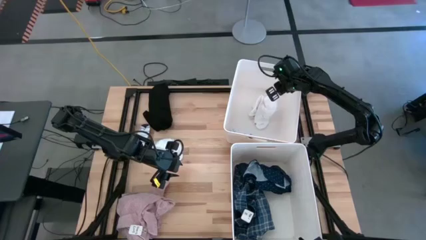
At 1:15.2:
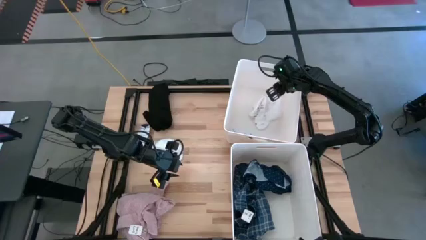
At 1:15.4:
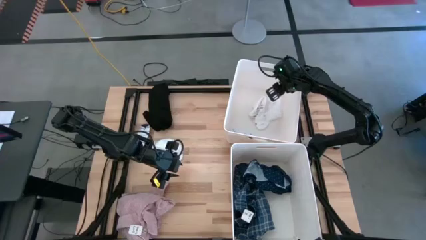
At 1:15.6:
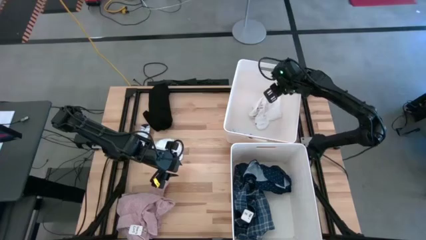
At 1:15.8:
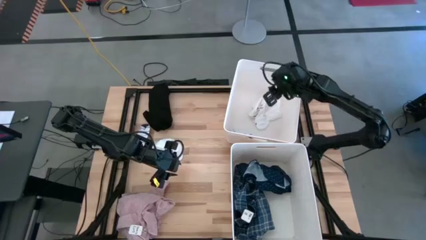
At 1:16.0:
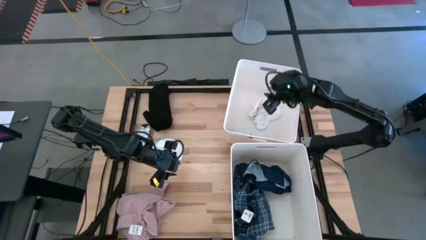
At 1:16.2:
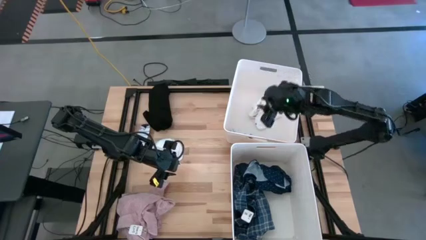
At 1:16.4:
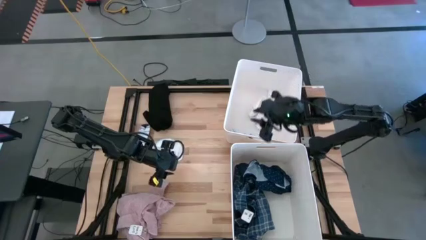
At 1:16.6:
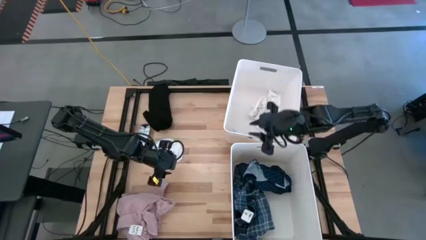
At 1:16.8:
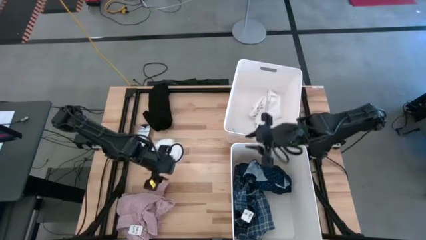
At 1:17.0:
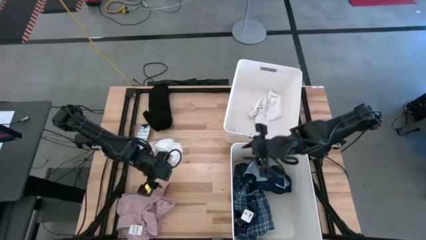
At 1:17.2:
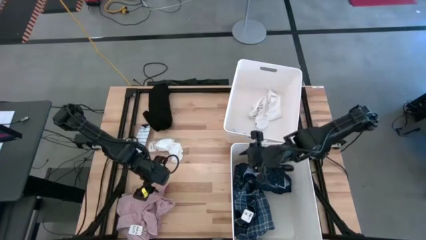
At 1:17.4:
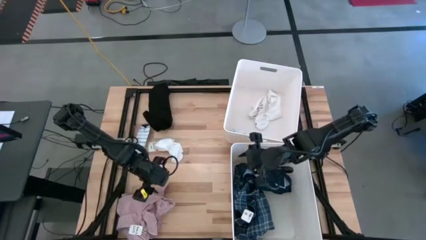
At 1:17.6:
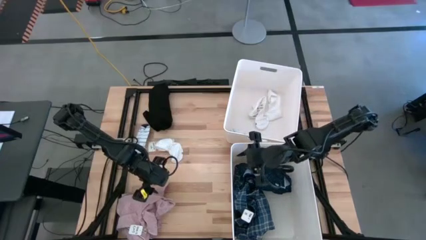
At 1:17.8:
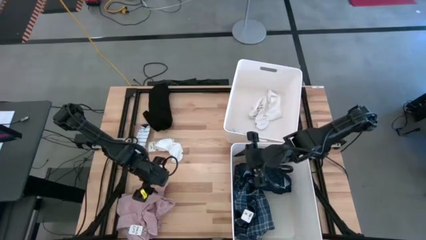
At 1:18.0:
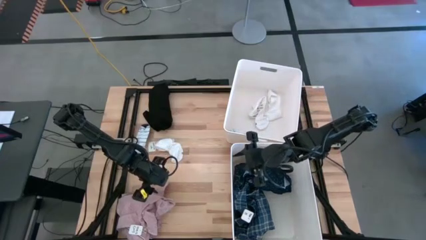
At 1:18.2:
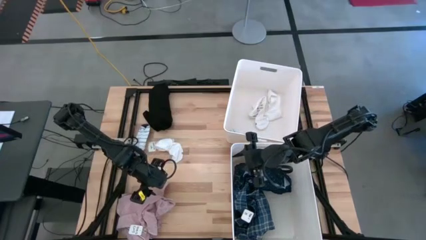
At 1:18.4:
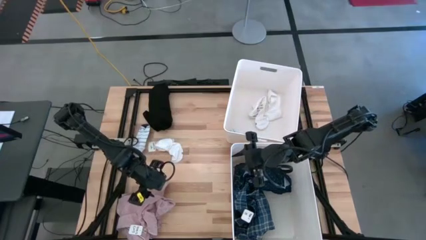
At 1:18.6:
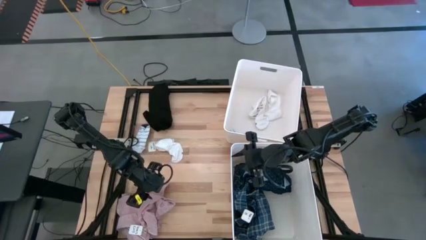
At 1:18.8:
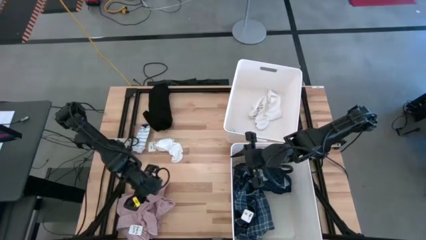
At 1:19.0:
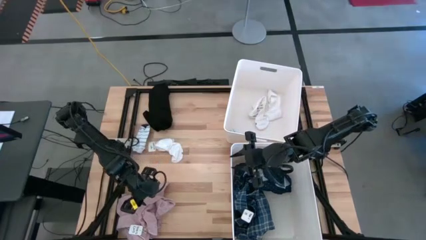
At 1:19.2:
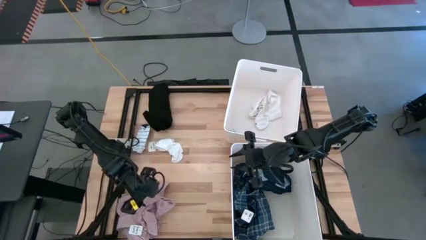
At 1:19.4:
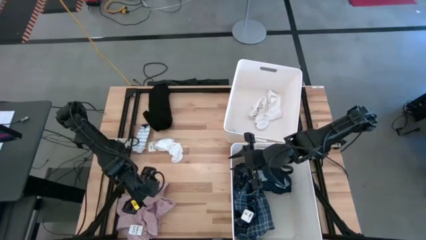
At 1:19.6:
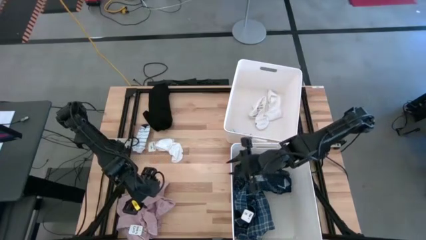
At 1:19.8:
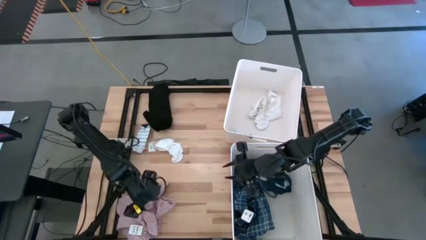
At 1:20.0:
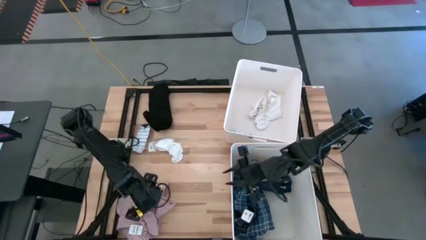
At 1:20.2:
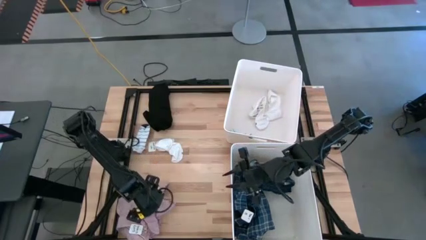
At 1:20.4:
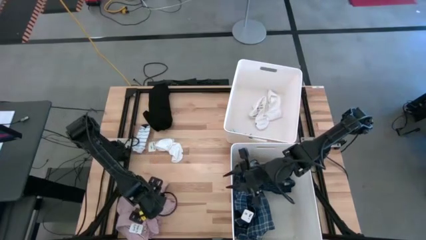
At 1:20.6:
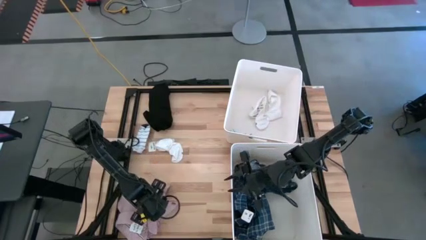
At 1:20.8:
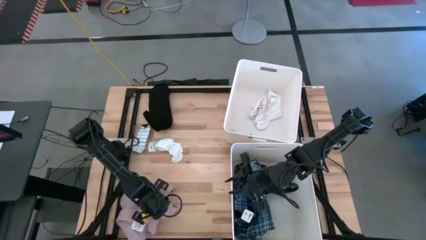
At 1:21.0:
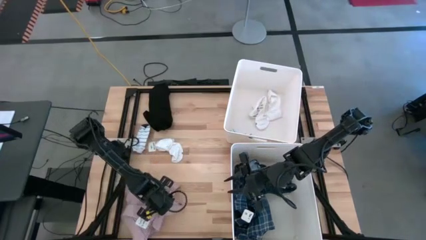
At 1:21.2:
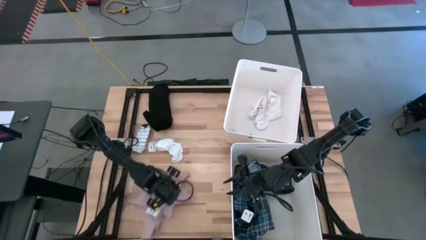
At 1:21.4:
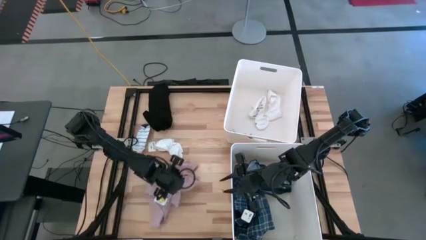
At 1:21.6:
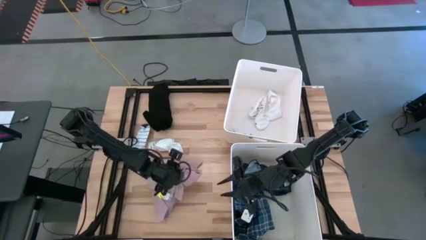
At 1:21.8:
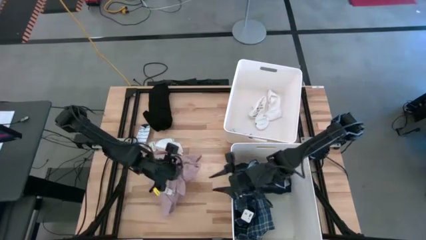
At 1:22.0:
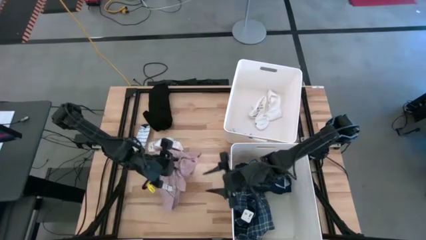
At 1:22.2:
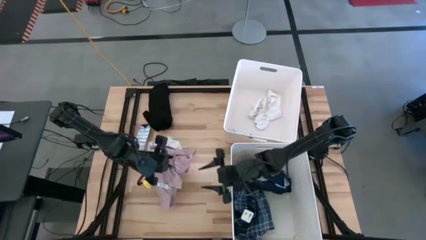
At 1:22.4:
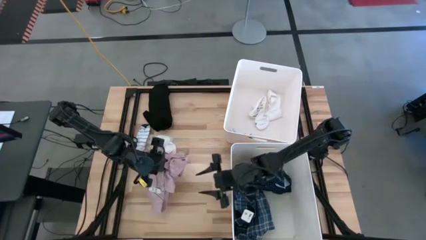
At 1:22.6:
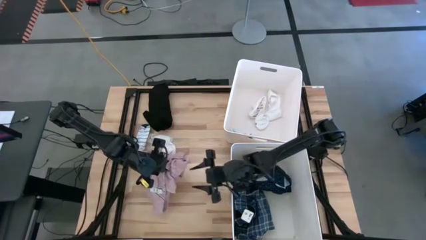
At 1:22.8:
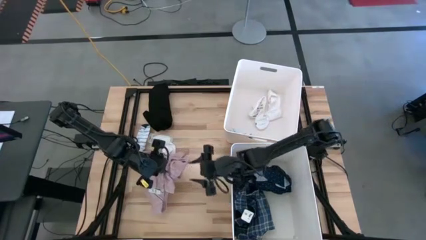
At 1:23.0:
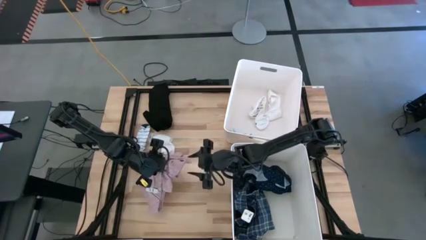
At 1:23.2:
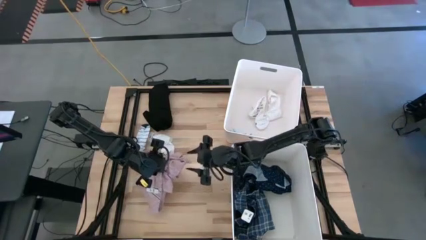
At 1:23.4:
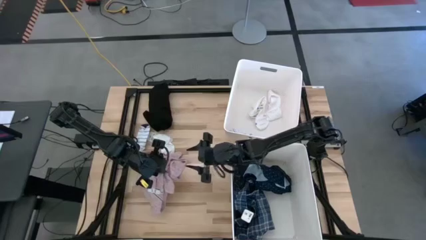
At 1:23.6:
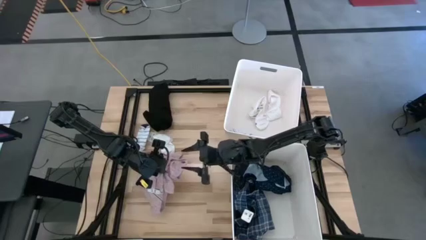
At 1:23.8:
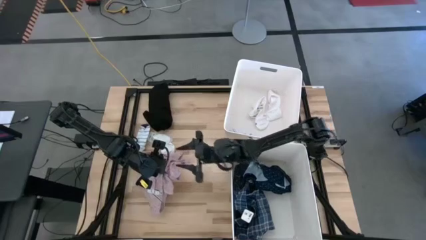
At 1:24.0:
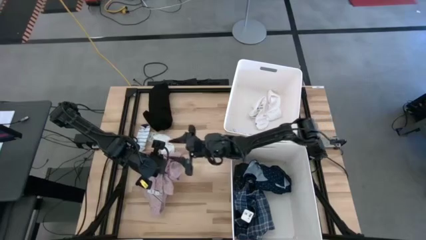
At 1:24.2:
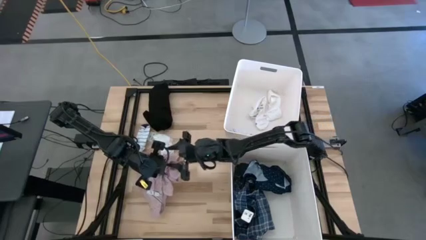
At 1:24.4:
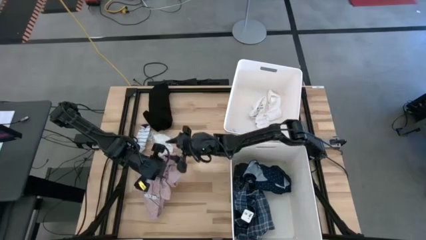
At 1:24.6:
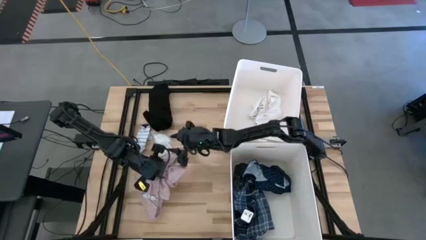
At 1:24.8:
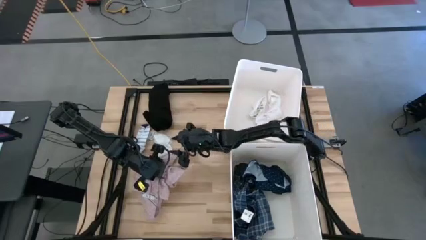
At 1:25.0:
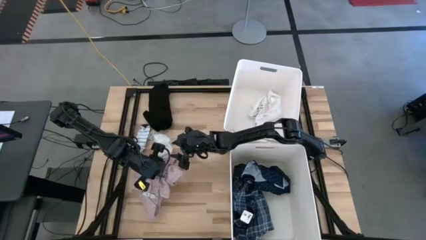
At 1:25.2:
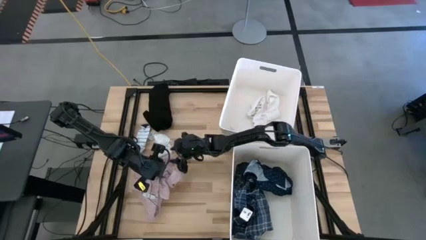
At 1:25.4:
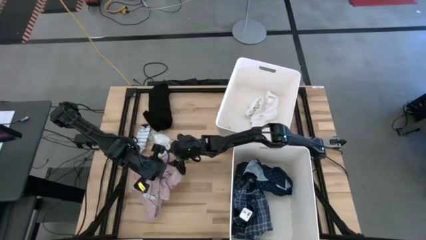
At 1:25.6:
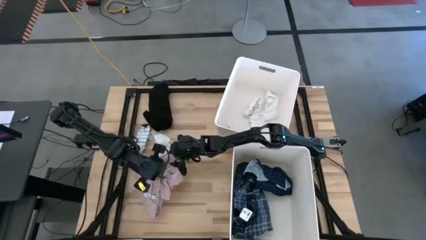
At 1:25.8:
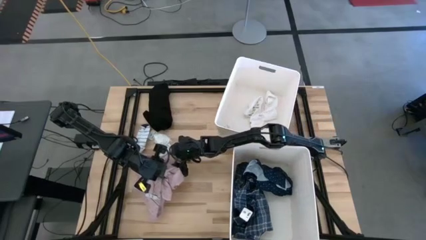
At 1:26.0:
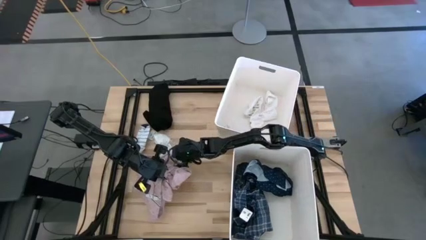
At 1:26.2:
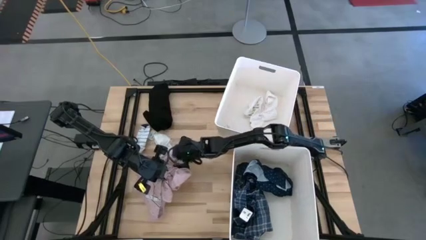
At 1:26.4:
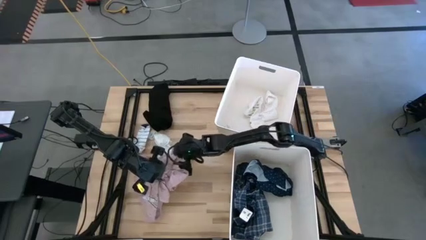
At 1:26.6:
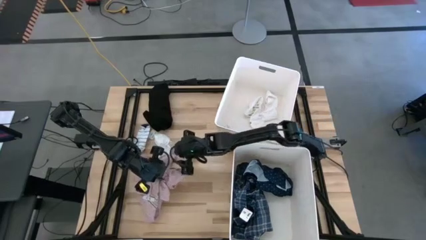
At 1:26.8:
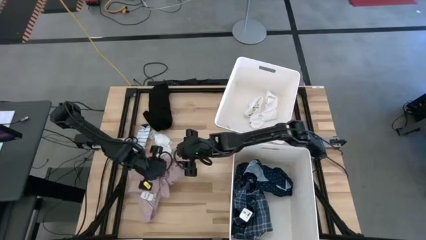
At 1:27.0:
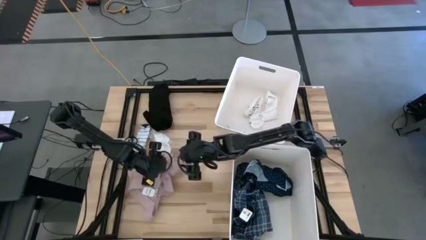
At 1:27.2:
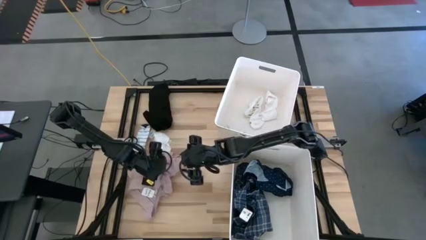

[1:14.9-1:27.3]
Task: Sort clothes
Put the light red polo shirt into the bottom white laundry bin

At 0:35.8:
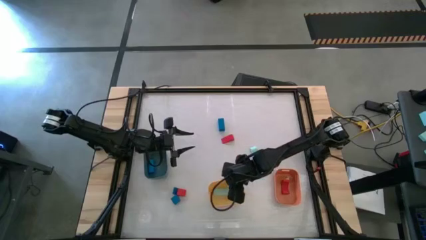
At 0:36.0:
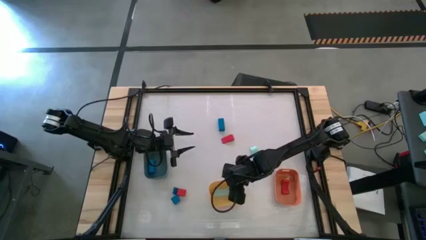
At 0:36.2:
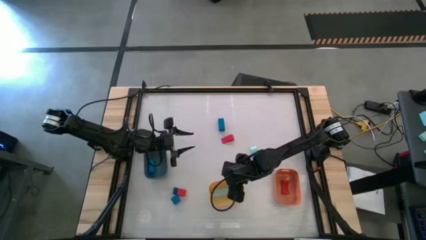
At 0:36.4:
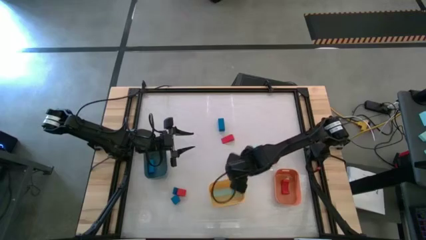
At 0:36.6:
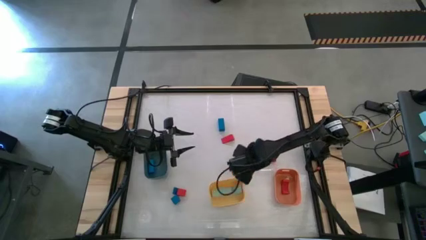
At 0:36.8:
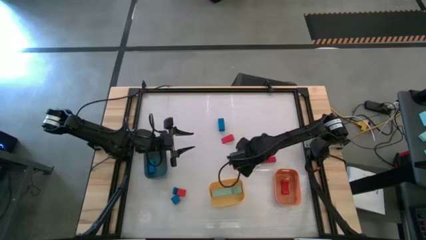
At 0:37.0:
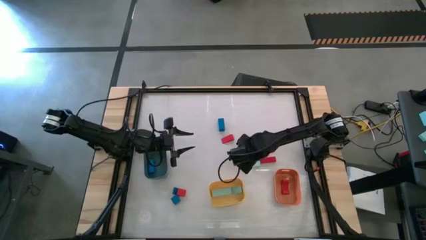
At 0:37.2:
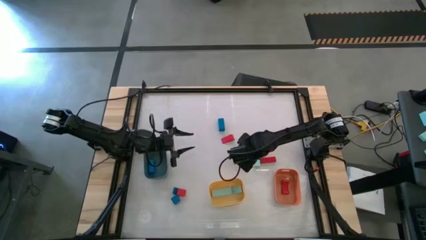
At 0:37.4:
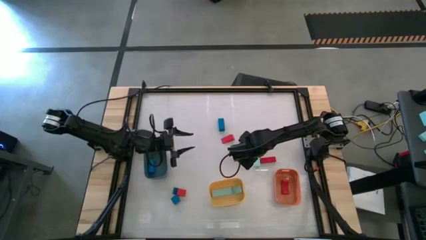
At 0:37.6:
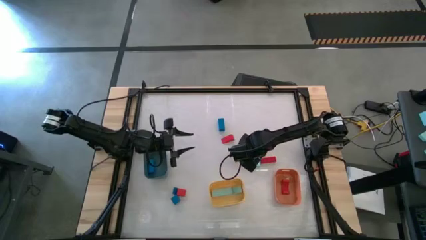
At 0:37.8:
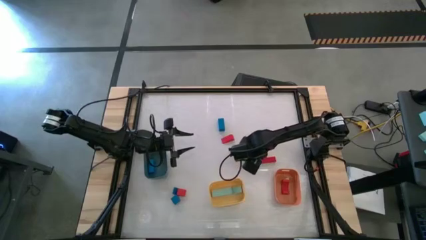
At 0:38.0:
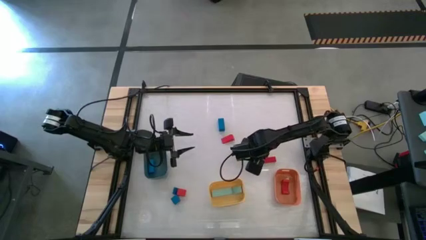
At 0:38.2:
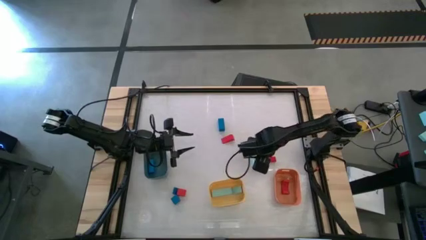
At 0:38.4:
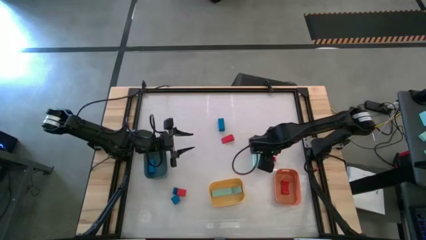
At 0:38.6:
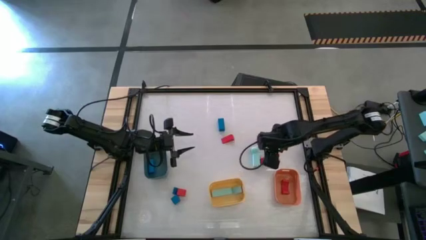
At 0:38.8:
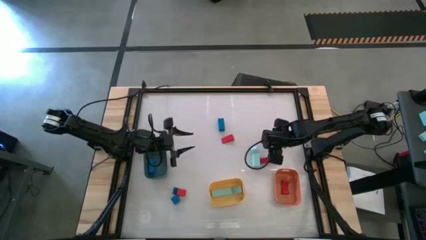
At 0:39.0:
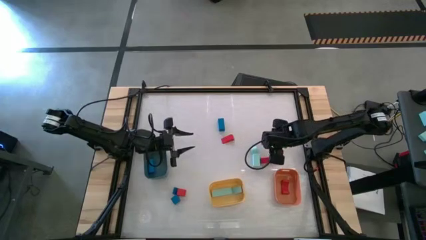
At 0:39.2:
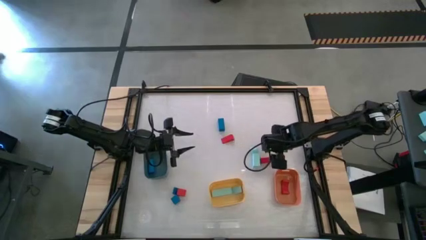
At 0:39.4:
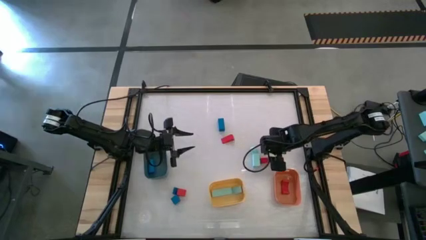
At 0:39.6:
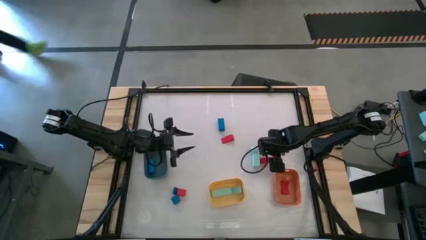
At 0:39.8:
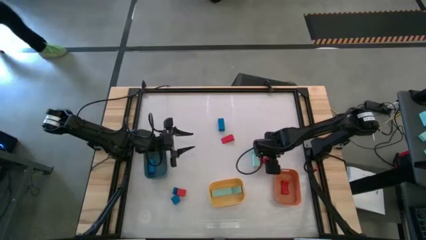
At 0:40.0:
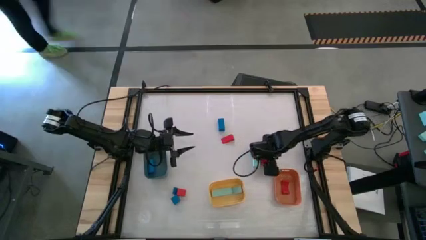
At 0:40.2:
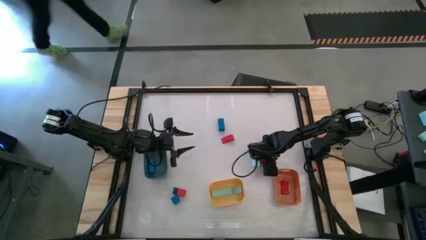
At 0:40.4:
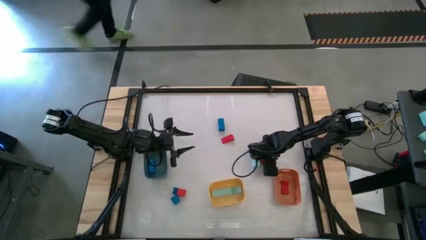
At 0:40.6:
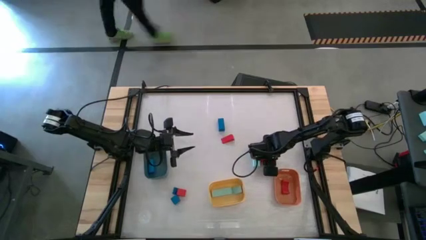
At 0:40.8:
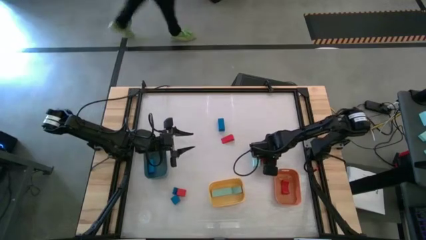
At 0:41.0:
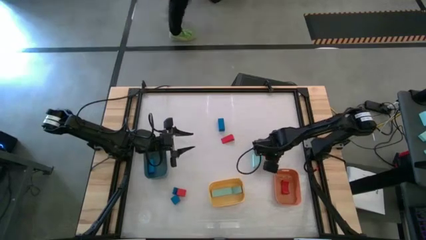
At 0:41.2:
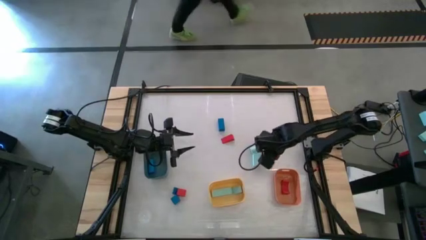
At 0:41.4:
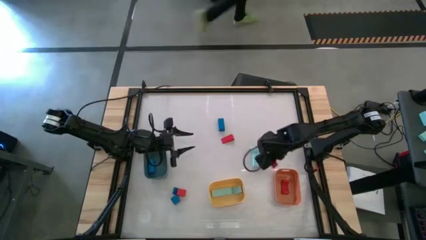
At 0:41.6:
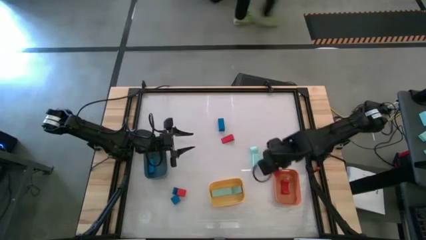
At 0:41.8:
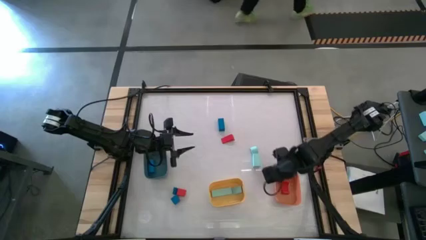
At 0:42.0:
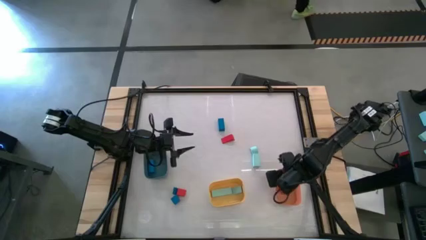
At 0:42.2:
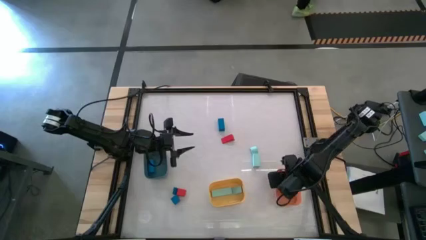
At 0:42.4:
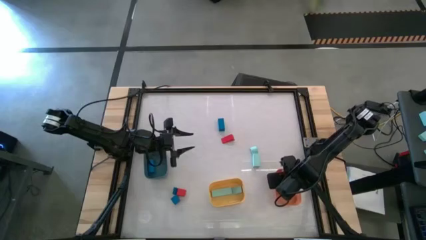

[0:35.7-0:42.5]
Task: Sort & place blocks by color
Put the red block into the orange bin
